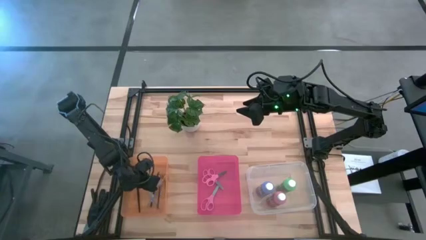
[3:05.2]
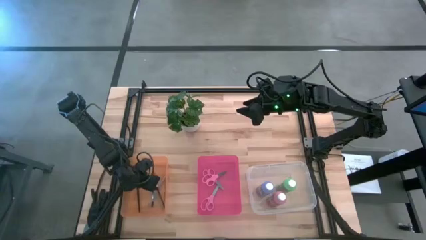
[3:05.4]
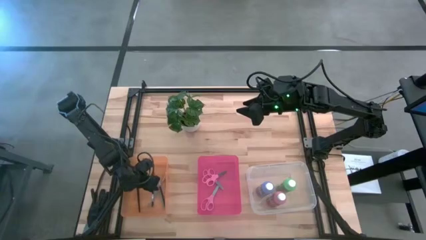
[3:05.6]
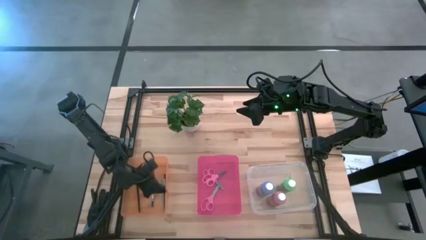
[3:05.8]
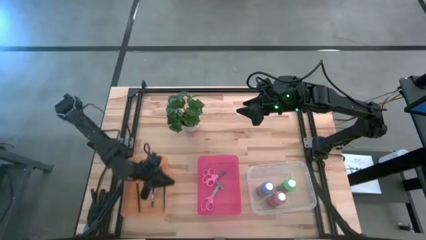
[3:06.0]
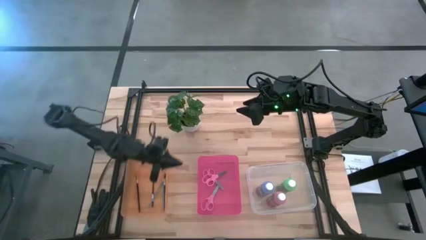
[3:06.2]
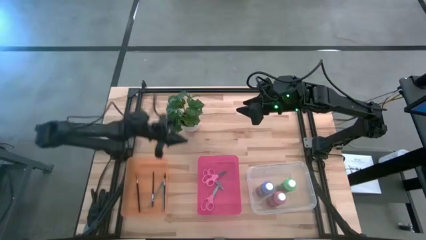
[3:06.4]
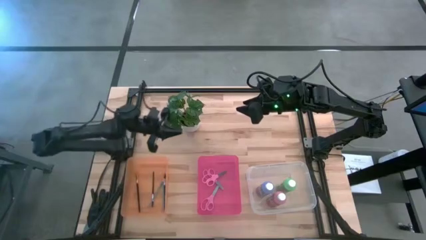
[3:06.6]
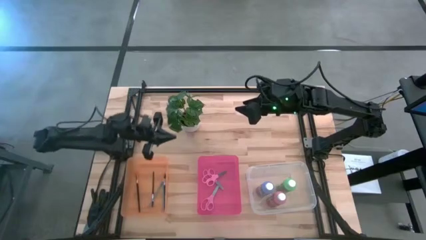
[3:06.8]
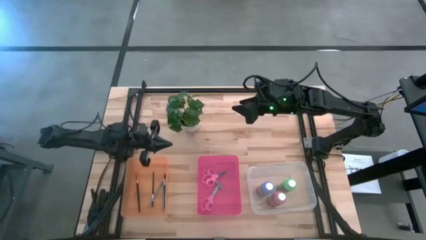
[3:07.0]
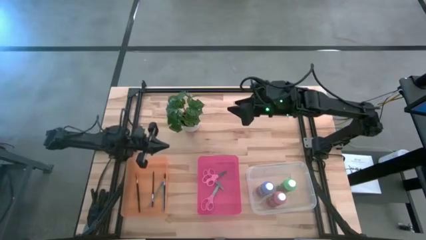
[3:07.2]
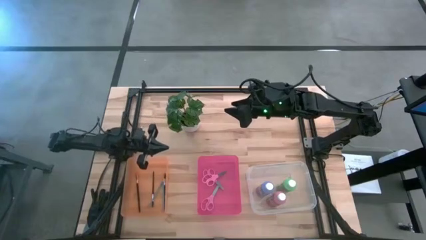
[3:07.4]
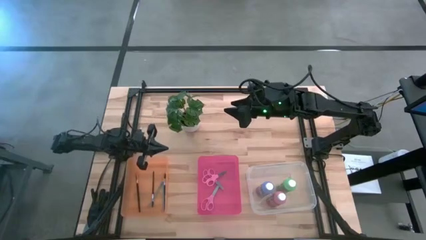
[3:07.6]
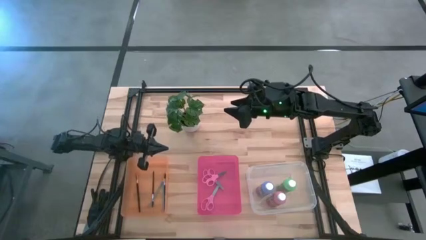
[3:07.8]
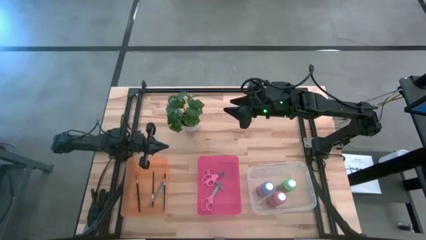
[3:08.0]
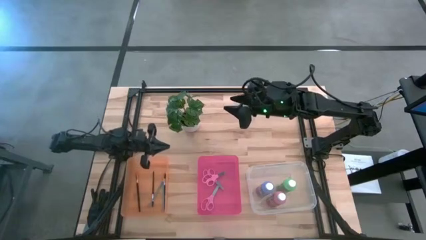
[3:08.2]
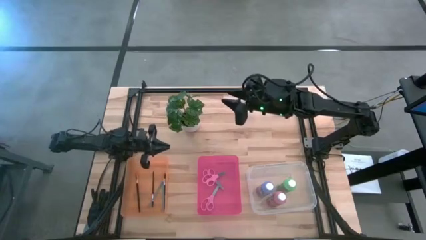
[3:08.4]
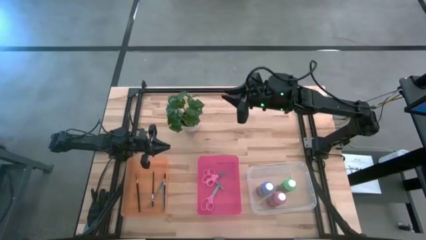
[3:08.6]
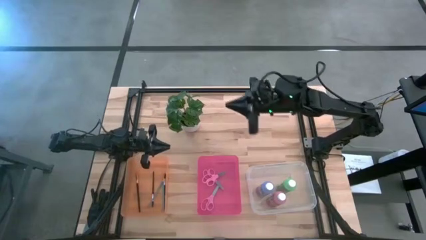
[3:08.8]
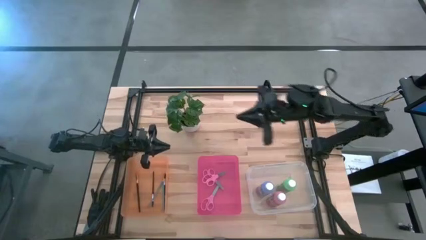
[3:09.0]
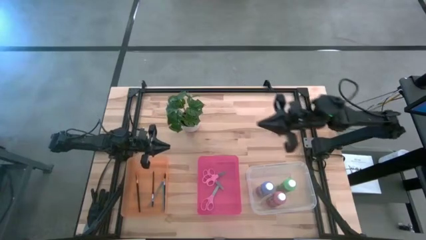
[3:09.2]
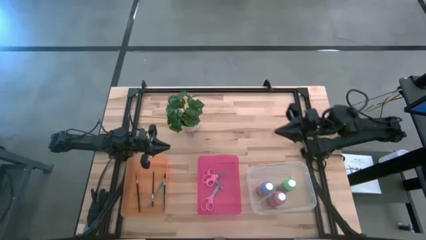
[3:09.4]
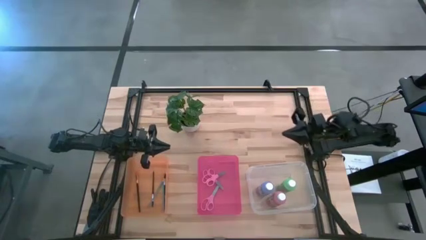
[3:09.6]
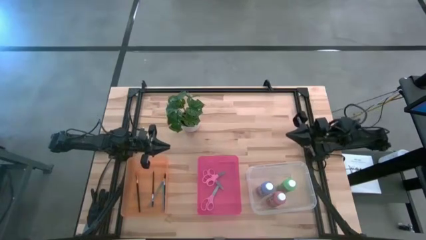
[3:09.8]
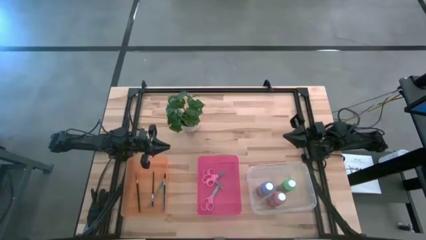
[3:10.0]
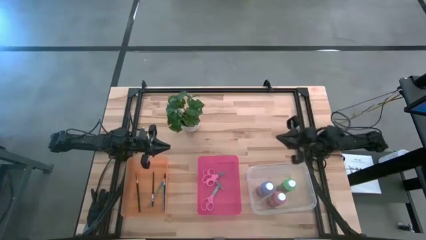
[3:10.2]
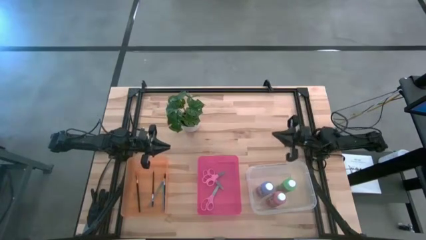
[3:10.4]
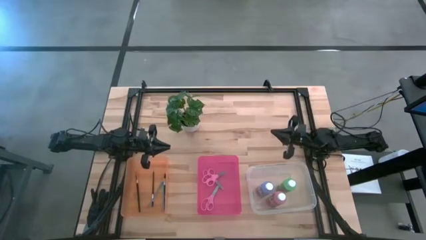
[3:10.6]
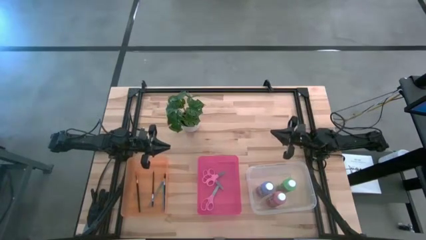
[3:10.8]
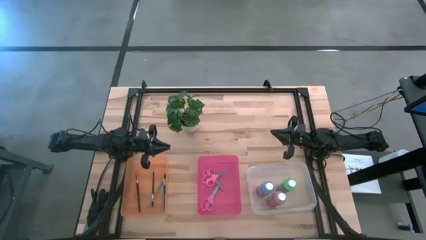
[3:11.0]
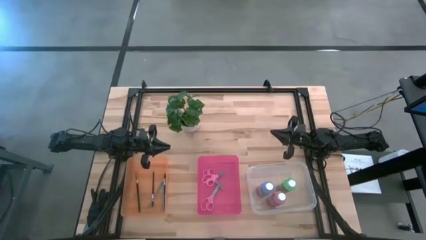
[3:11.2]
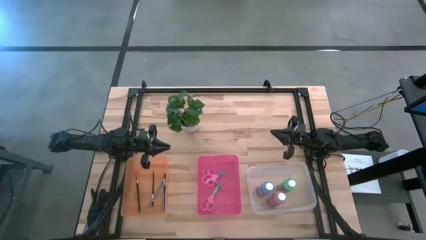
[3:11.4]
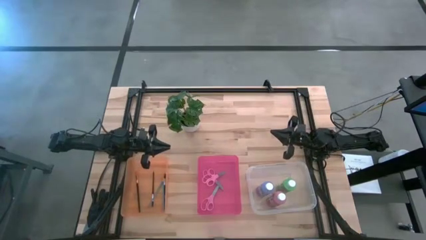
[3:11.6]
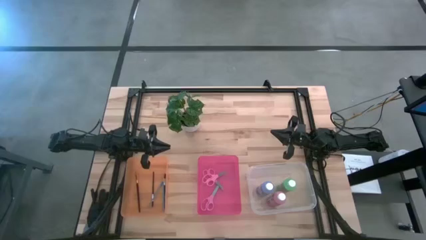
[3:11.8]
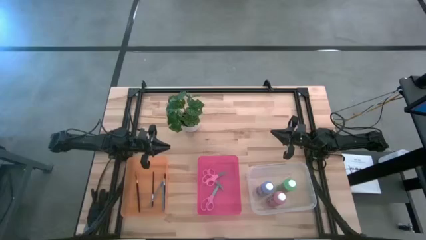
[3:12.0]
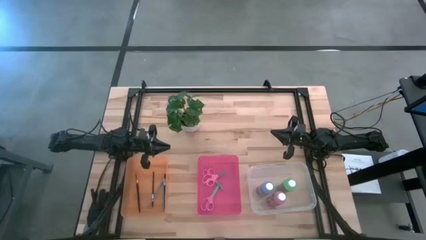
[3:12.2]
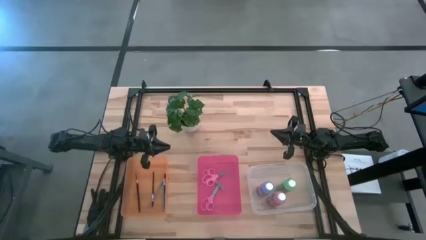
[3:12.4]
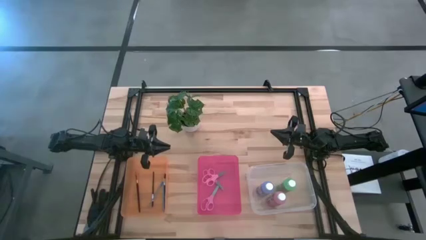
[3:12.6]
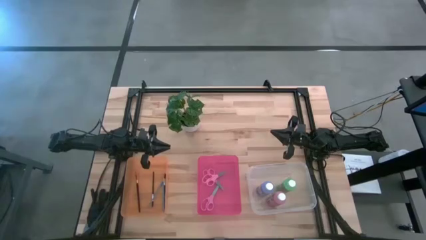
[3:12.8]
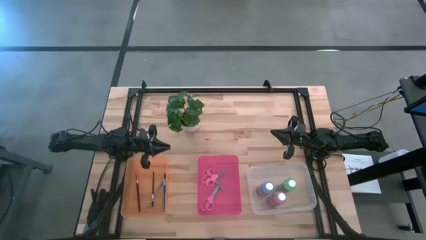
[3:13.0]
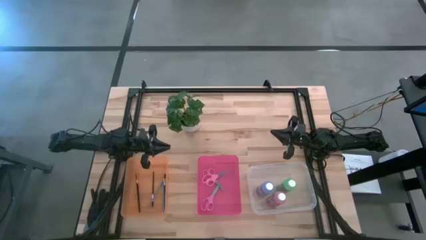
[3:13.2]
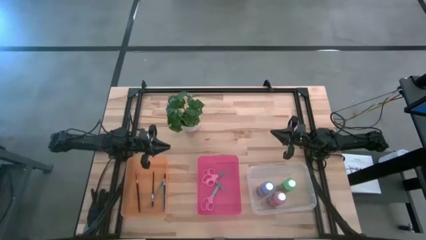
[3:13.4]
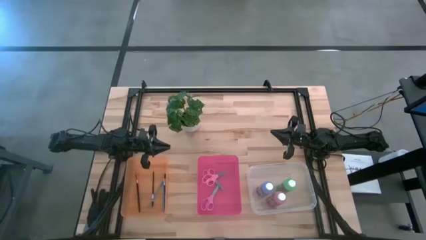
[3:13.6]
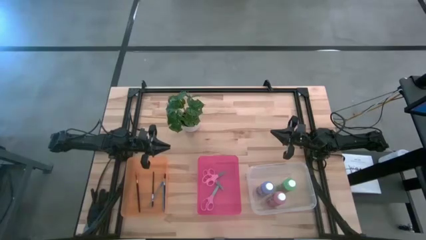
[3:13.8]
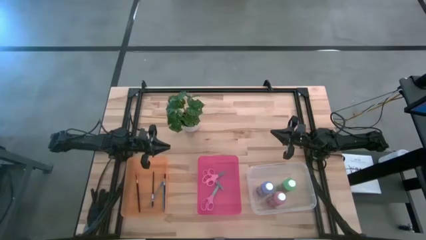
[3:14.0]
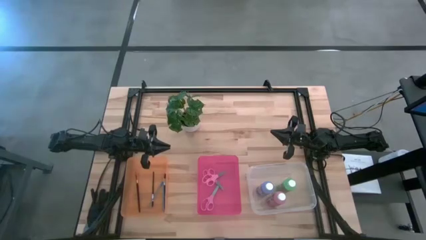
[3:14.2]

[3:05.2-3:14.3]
Task: Pick & Place Paint Supplies
Return to Home Position

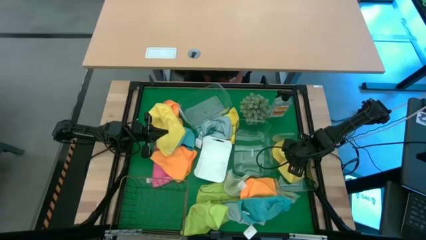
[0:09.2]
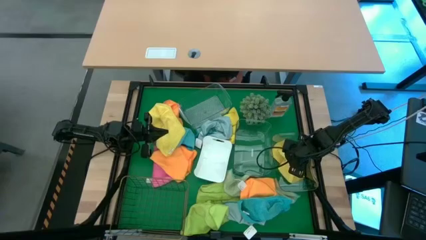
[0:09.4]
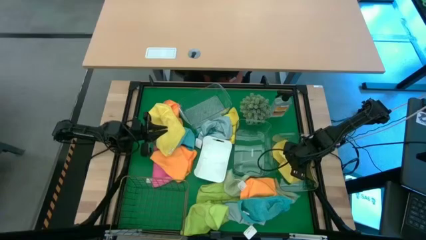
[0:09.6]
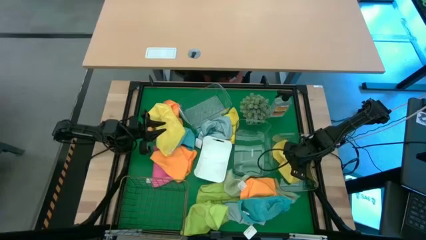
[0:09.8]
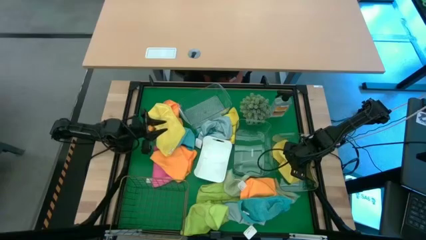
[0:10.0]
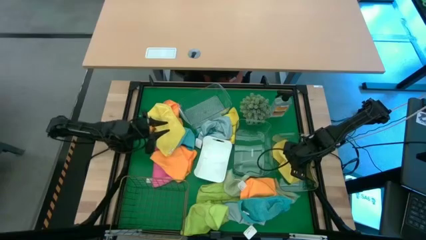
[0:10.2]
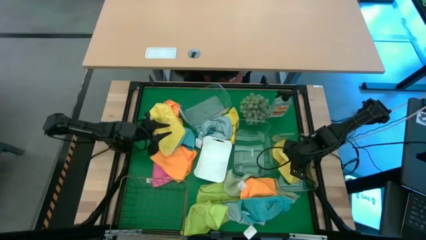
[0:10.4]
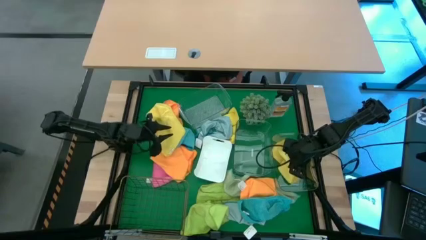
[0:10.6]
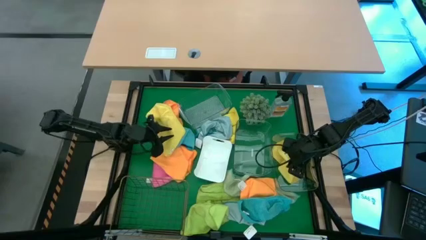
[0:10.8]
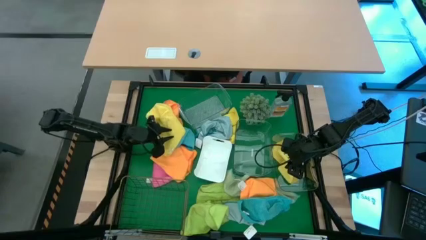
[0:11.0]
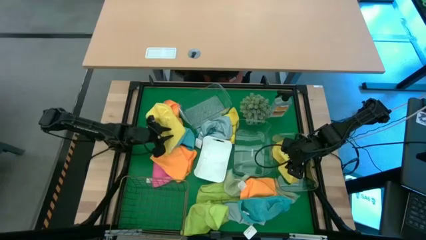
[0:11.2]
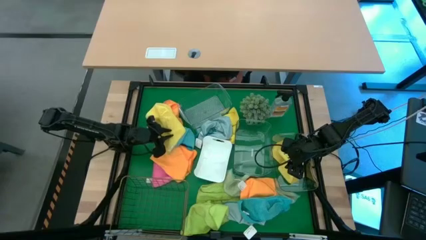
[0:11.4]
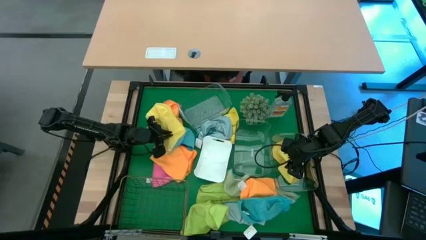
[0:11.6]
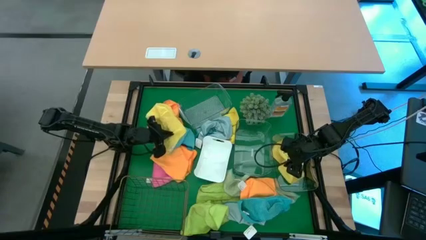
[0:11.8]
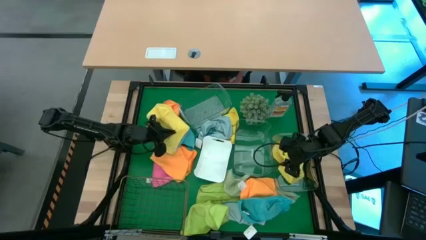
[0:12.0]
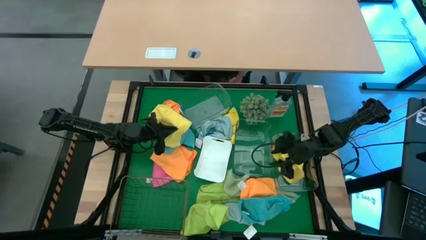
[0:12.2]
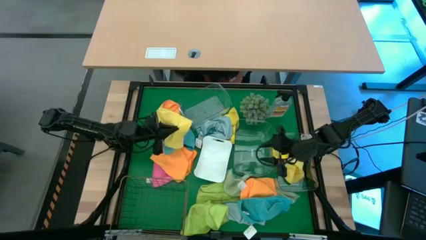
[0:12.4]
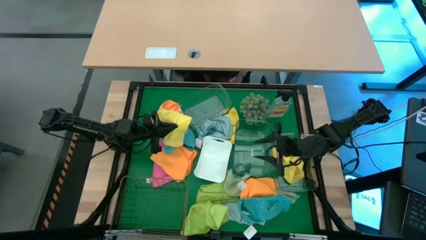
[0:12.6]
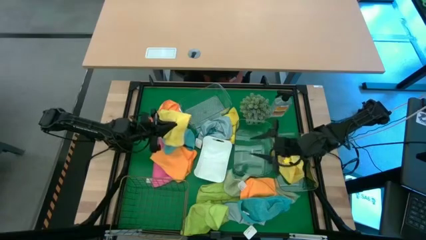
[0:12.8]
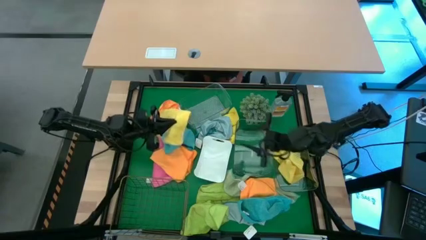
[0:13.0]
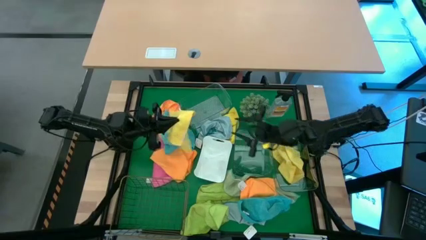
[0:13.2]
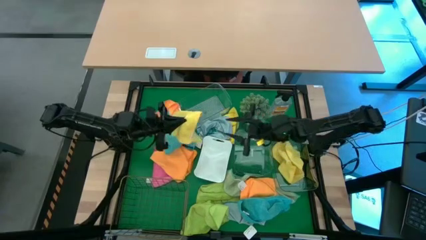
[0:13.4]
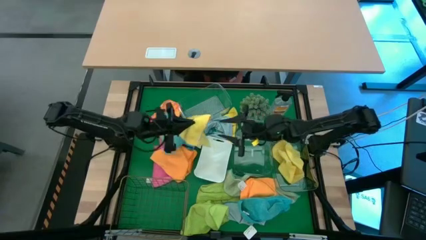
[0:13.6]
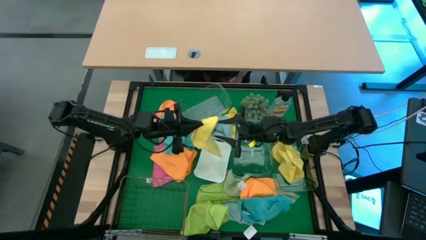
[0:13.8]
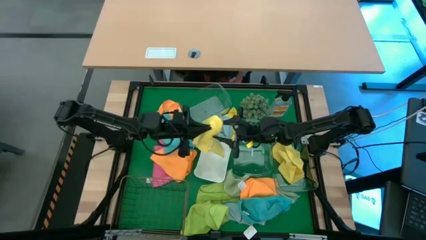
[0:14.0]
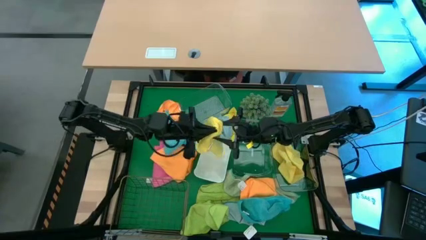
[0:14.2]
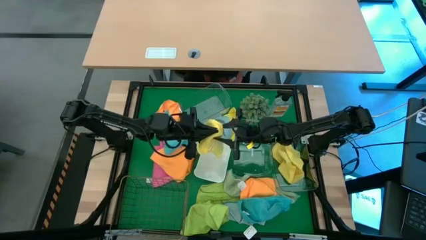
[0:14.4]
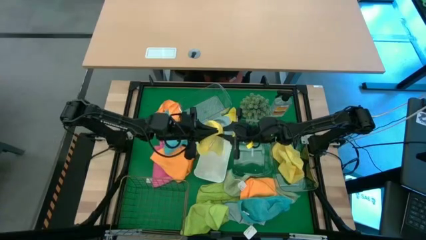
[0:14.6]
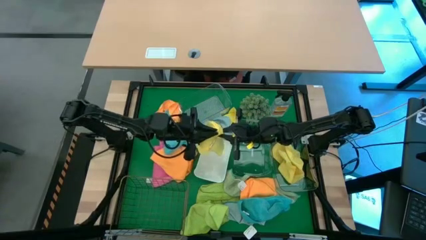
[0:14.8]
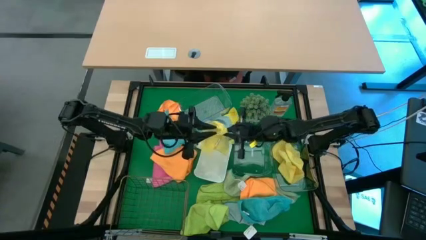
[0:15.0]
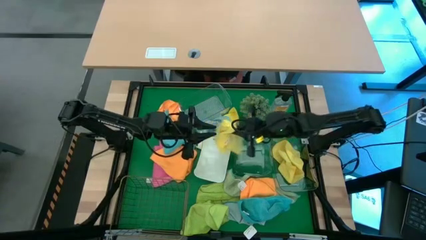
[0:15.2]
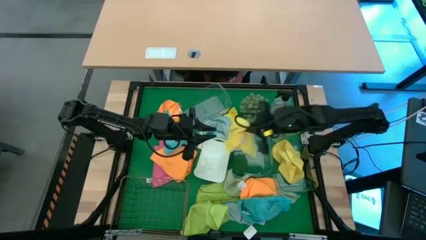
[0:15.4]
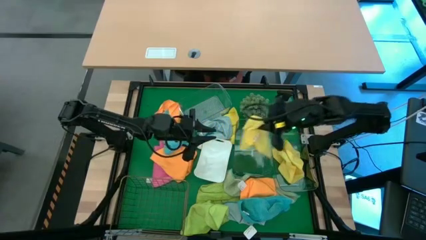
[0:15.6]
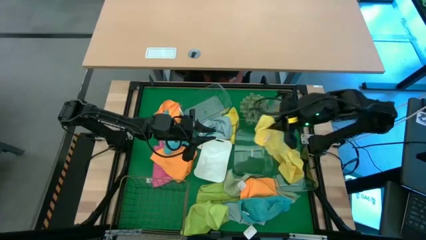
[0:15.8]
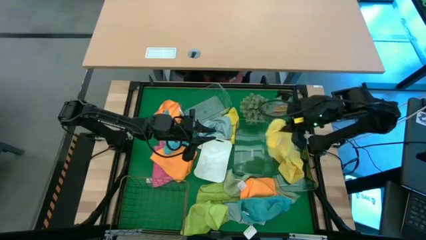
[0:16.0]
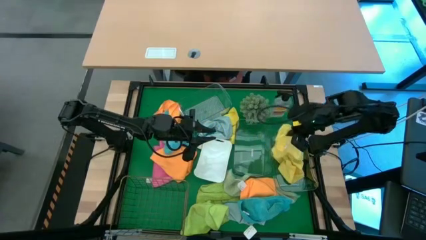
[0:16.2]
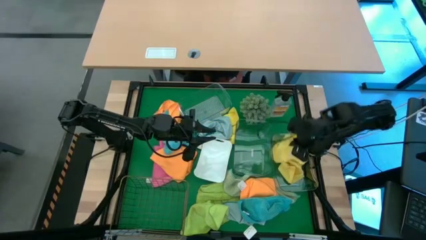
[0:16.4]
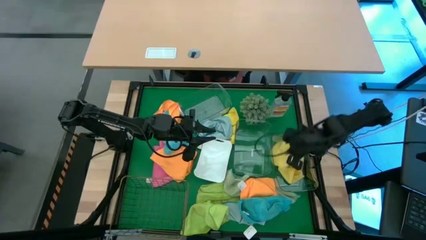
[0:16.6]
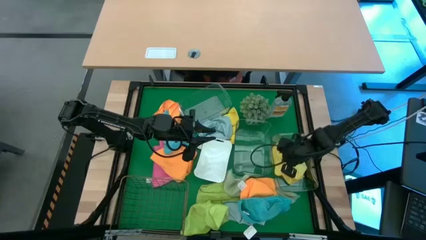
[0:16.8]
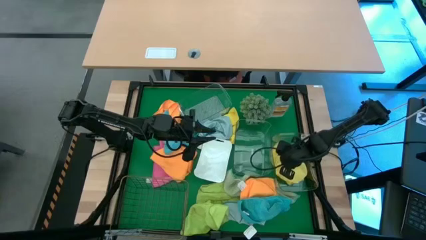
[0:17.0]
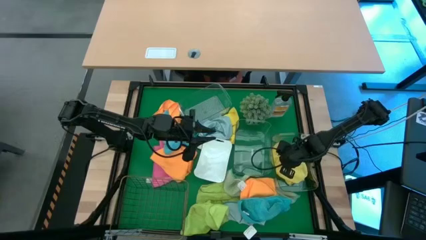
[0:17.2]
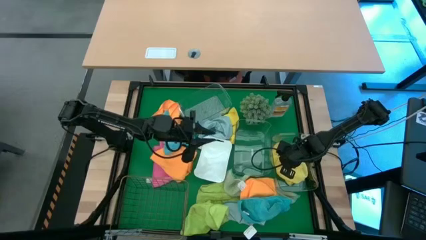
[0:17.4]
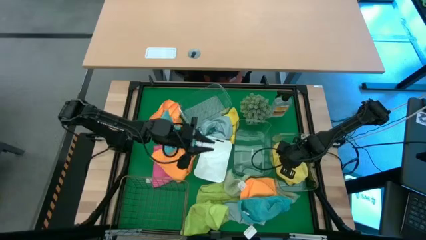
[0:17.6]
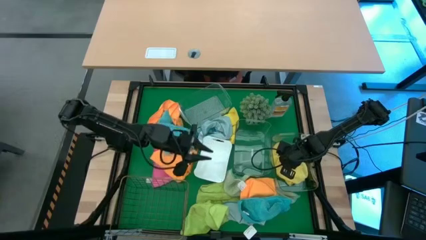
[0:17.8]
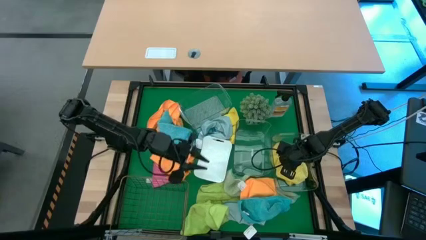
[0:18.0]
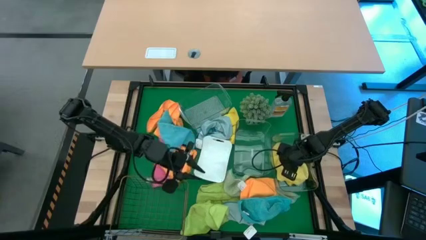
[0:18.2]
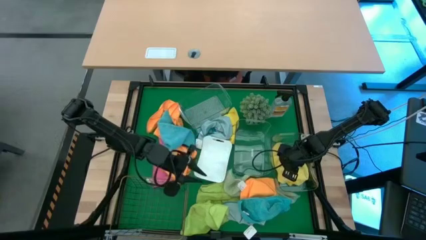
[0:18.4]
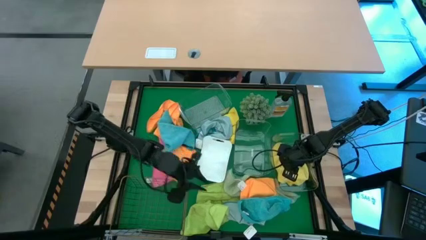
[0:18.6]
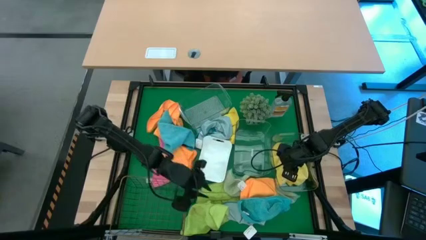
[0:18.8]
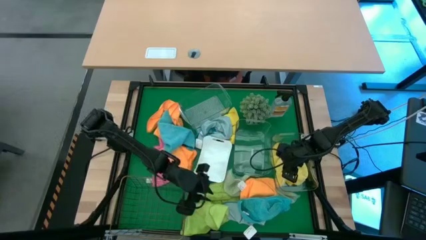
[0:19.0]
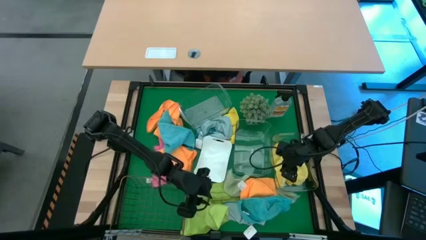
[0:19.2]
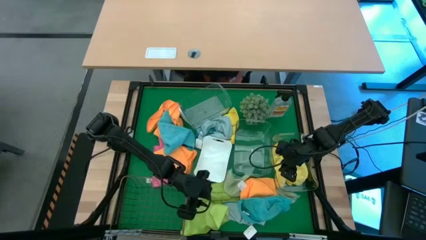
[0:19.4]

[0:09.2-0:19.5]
Task: Sort microfiber towel by color & place in baskets
Put the yellow microfiber towel into the right transparent bin
